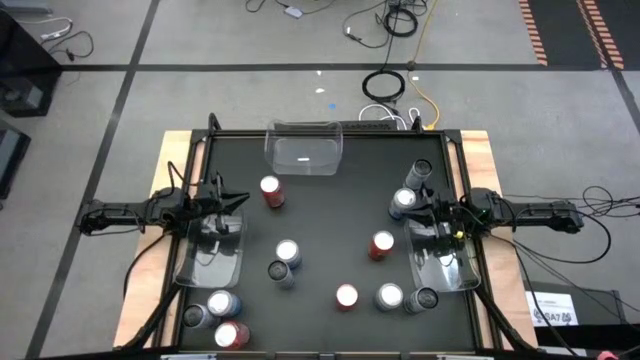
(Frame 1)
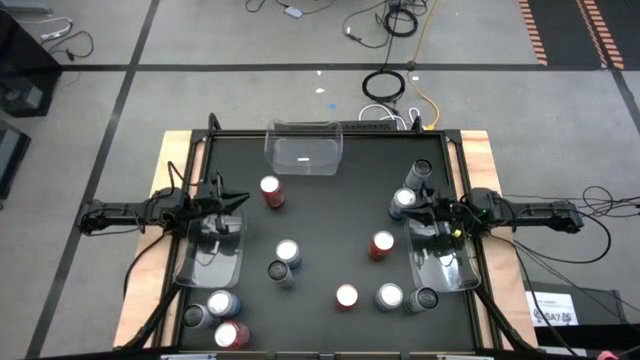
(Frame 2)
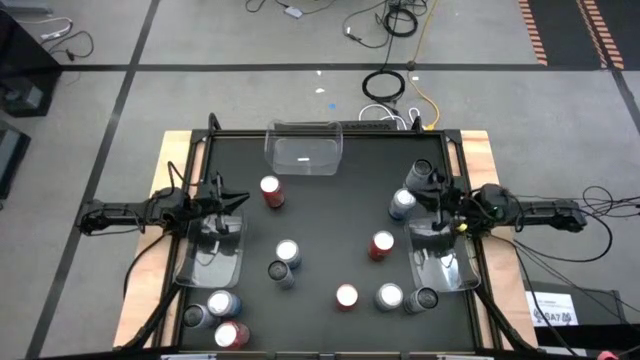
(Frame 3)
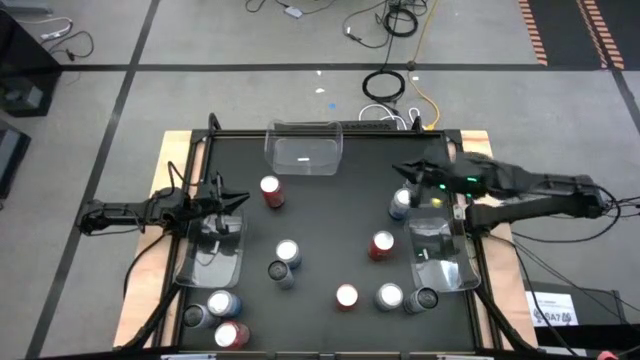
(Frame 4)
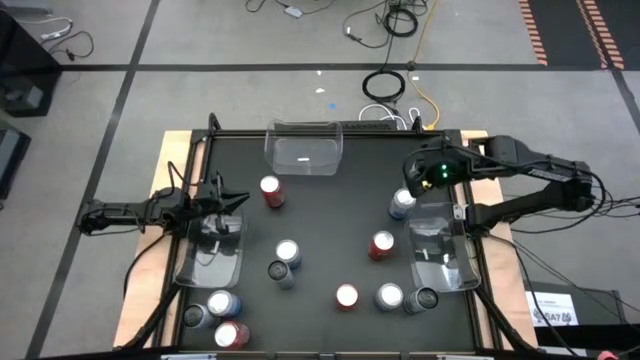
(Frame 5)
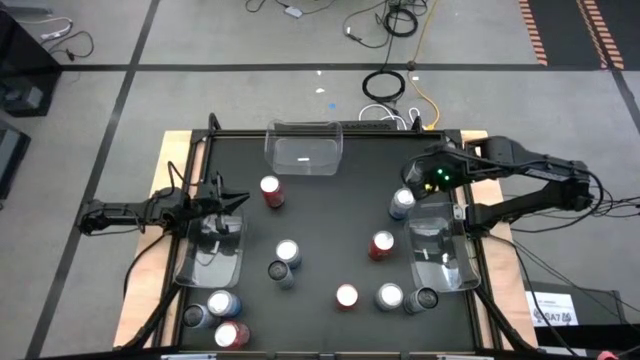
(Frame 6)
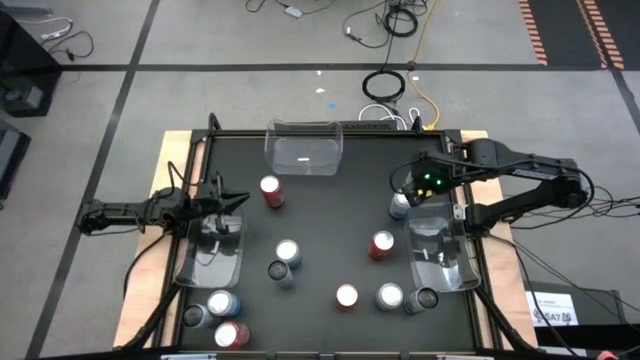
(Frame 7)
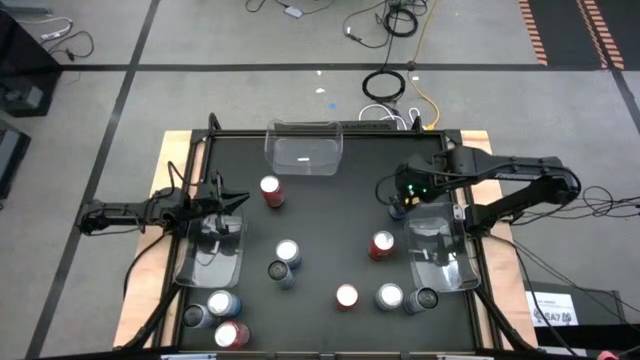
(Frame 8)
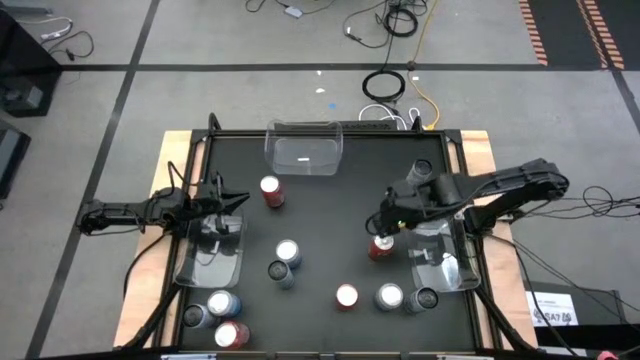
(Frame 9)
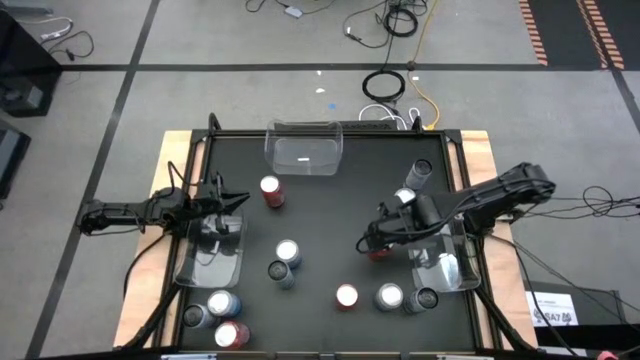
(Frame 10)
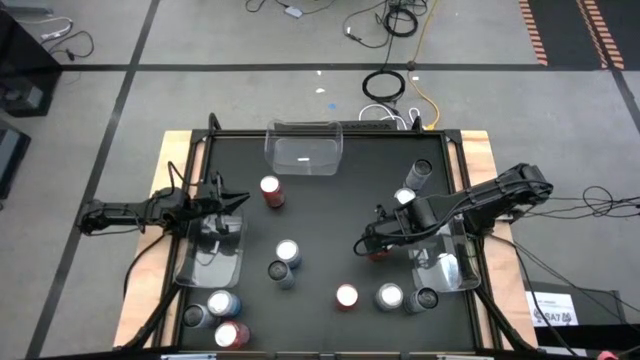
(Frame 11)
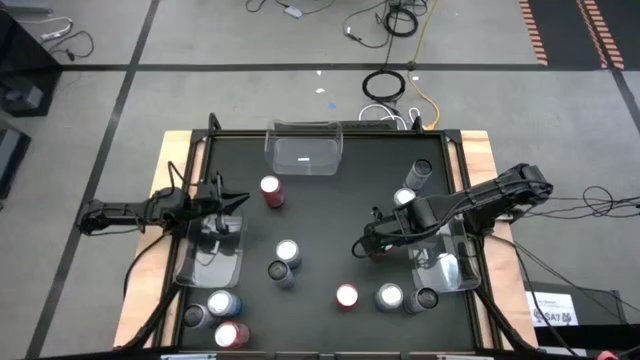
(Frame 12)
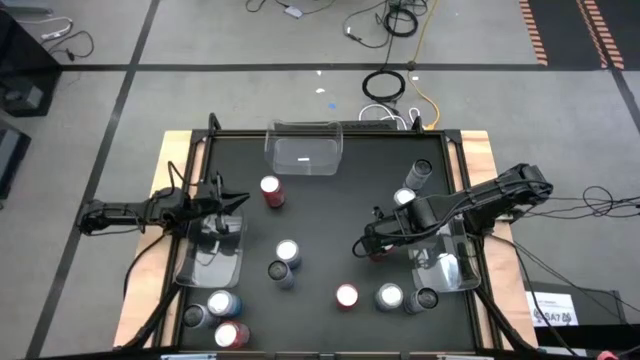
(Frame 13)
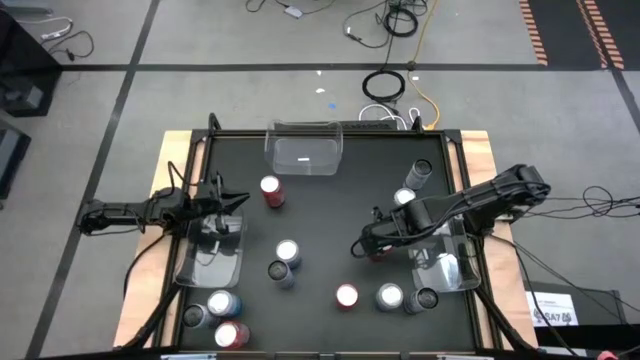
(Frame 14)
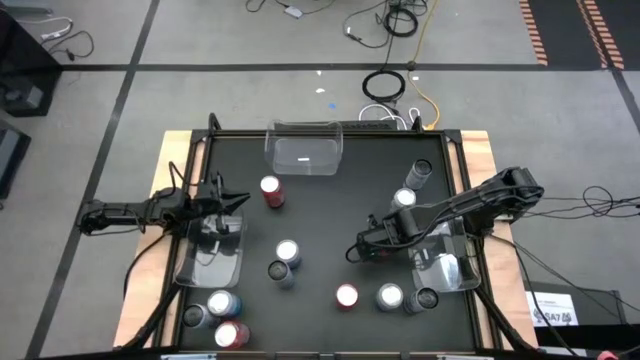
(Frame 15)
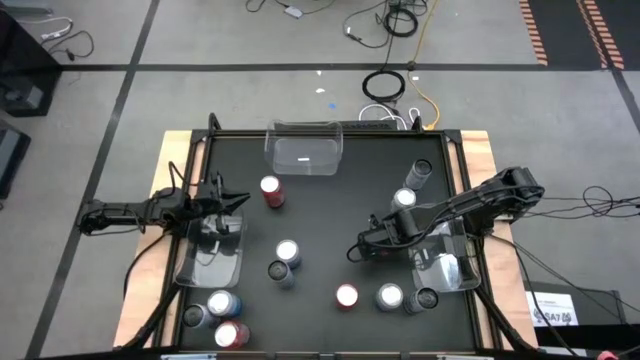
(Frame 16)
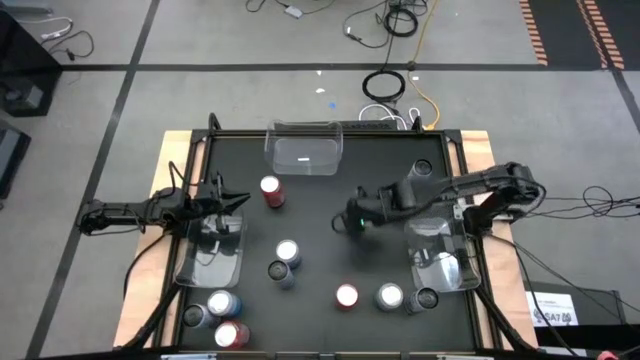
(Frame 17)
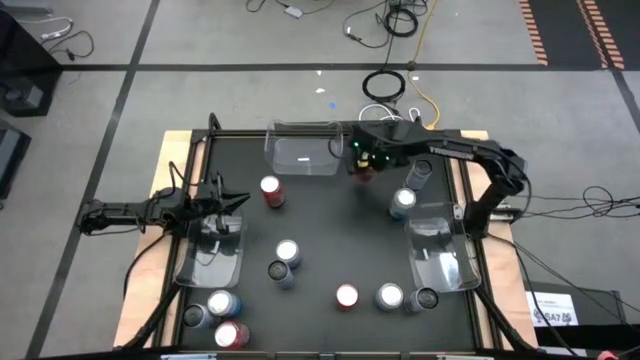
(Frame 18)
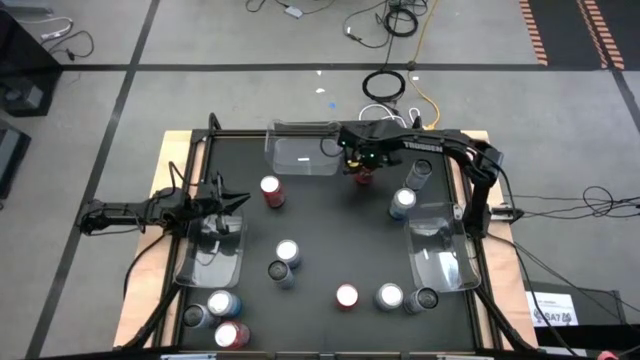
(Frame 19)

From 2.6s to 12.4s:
Task: Sort soda cans
Move the red soda can to the top center of the table

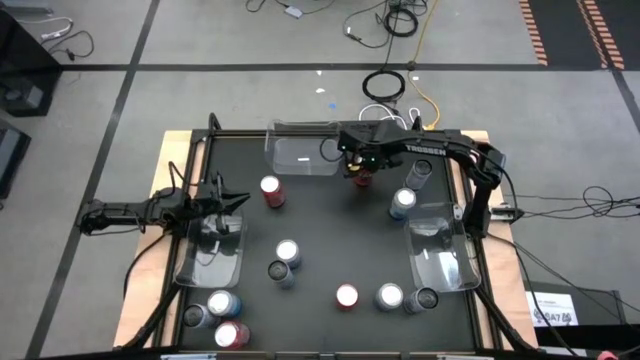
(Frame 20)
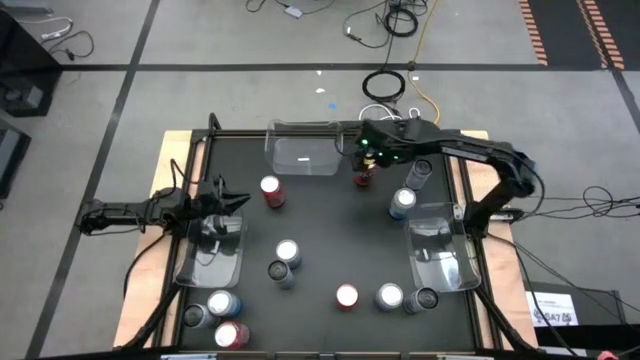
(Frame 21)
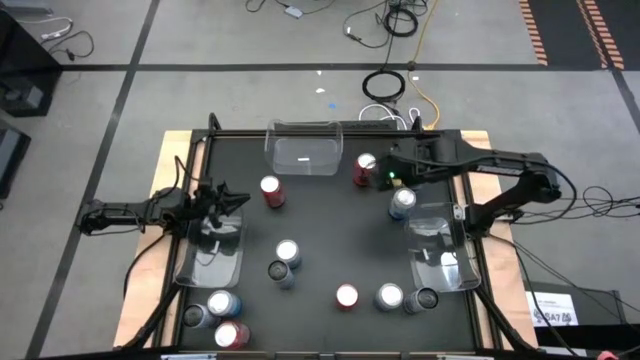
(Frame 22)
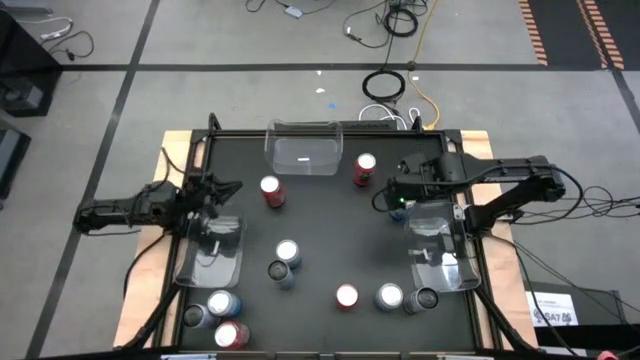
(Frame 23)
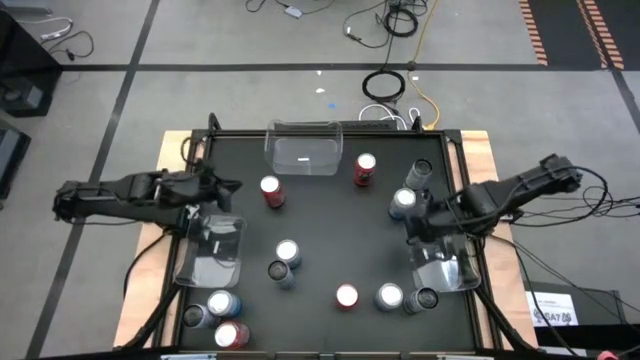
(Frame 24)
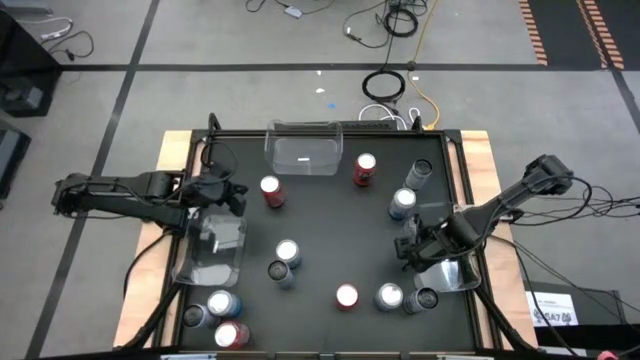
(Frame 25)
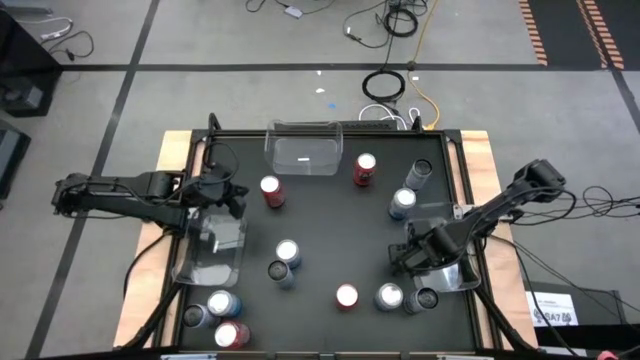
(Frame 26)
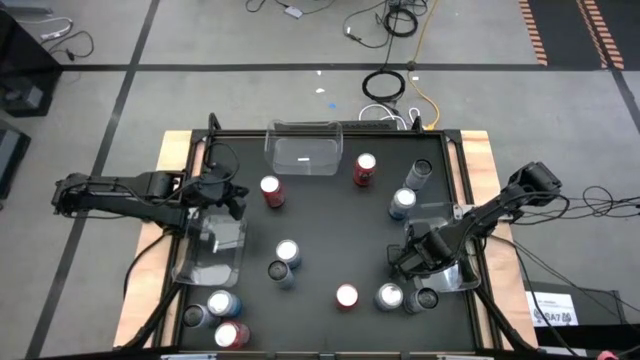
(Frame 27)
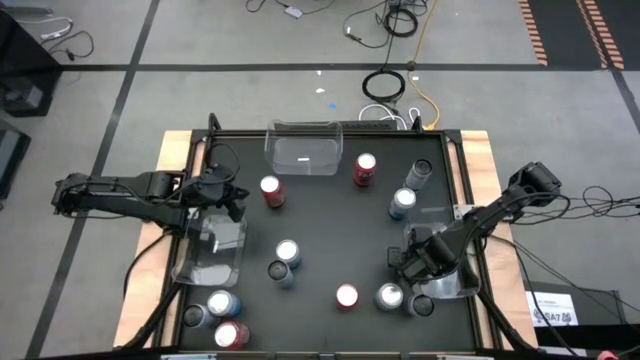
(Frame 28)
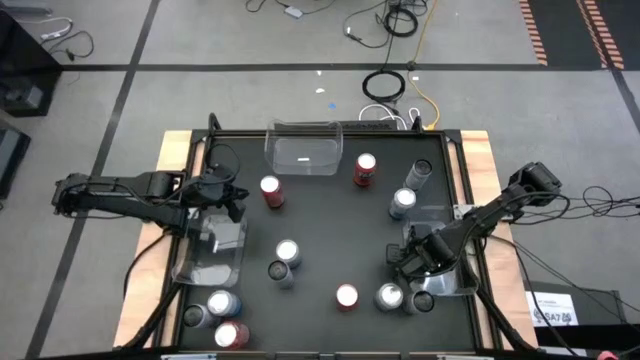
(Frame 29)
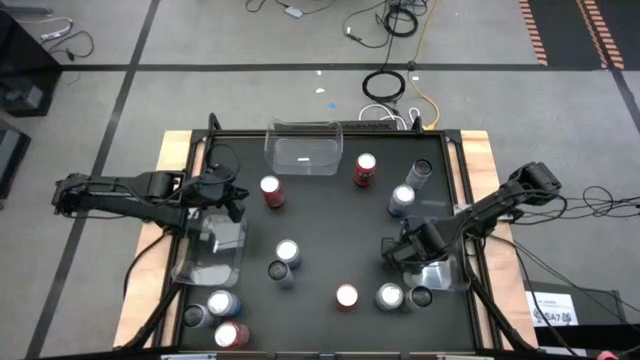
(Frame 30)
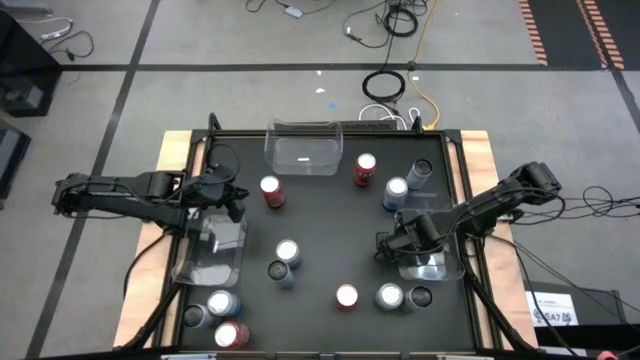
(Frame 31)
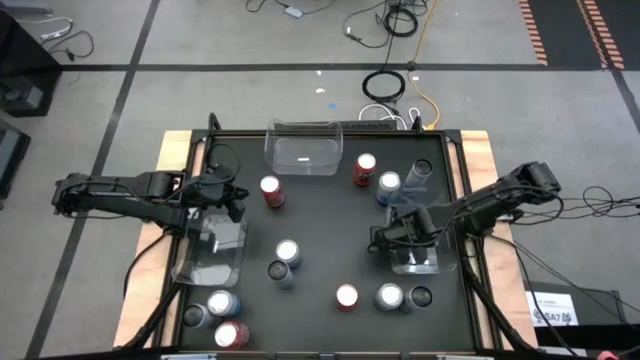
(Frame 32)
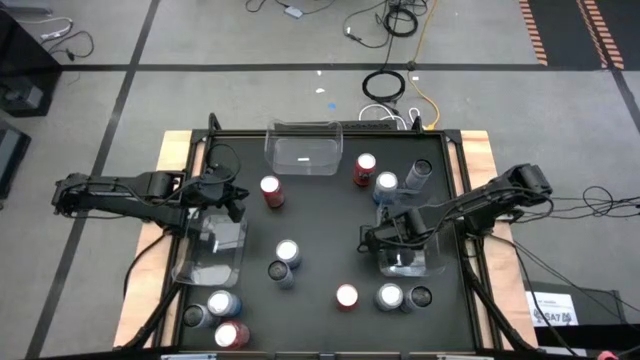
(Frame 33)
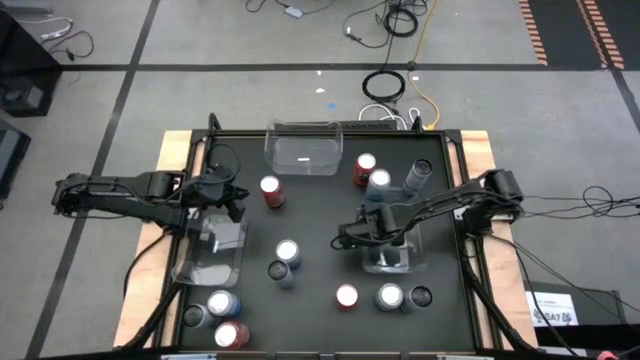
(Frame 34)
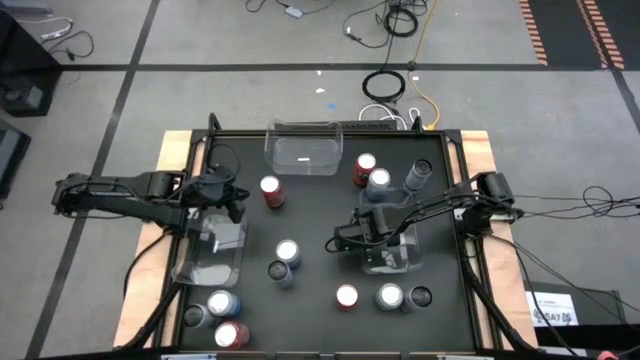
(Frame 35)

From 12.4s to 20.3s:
Adjust the right transparent bin to the middle right of the table

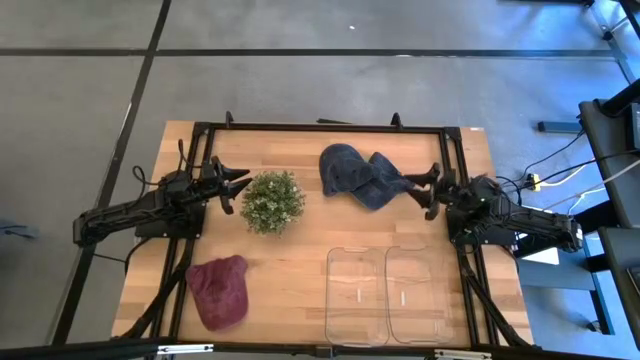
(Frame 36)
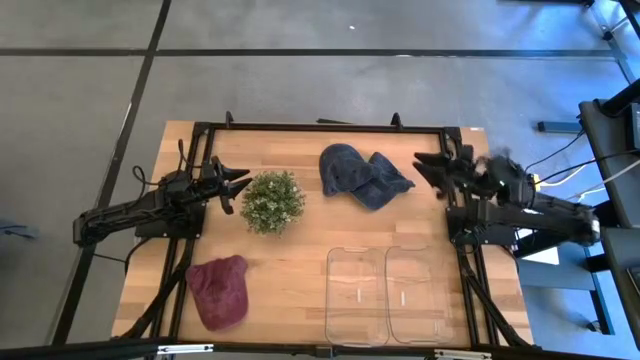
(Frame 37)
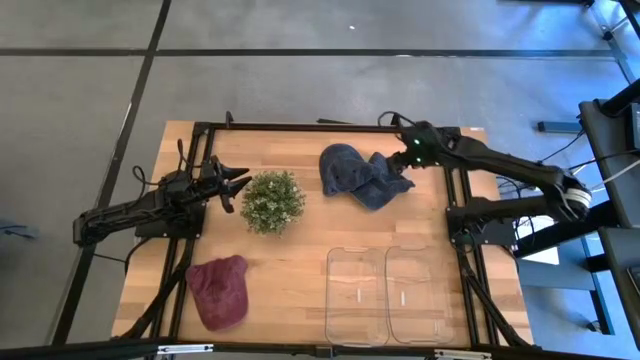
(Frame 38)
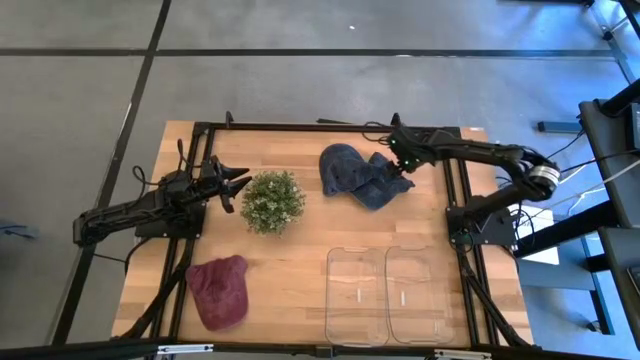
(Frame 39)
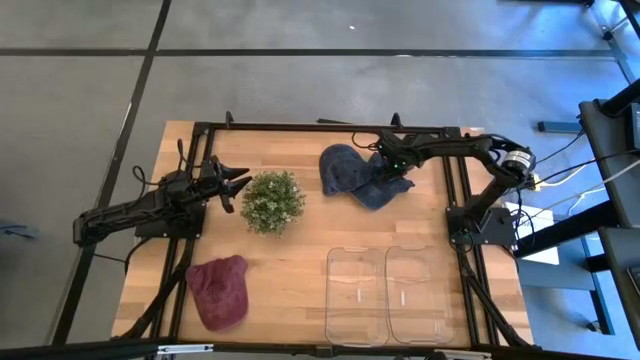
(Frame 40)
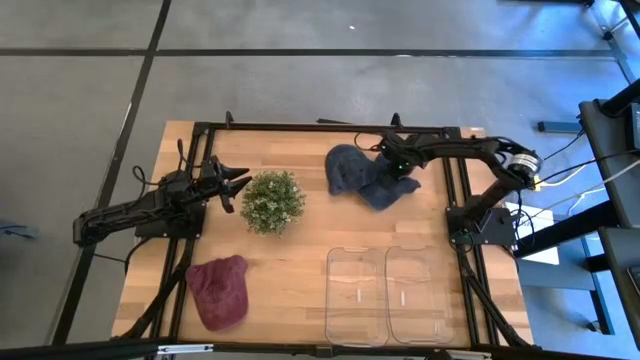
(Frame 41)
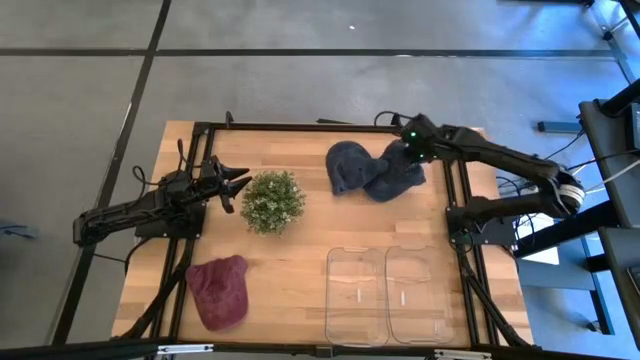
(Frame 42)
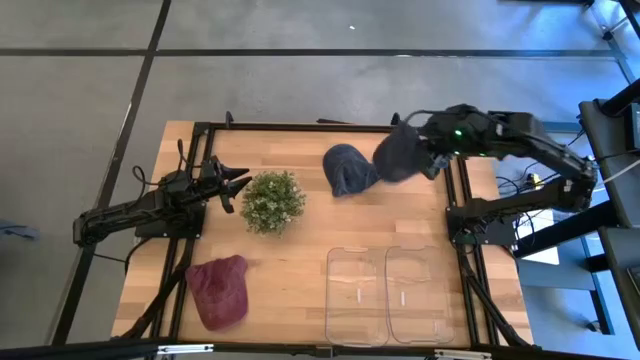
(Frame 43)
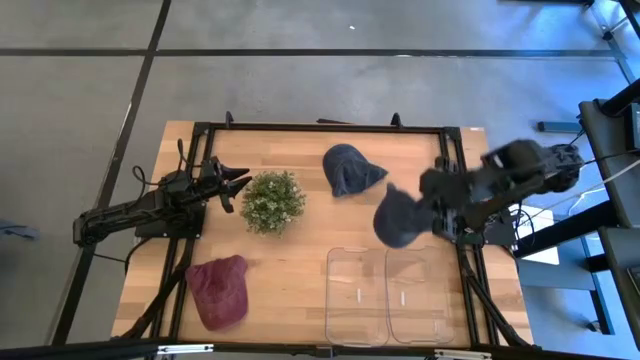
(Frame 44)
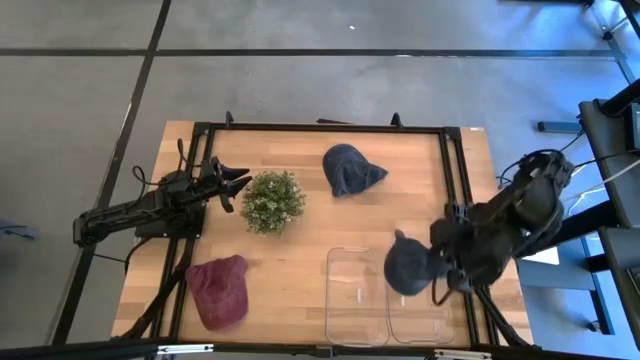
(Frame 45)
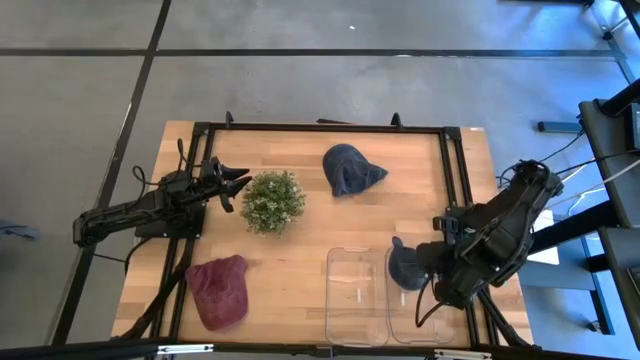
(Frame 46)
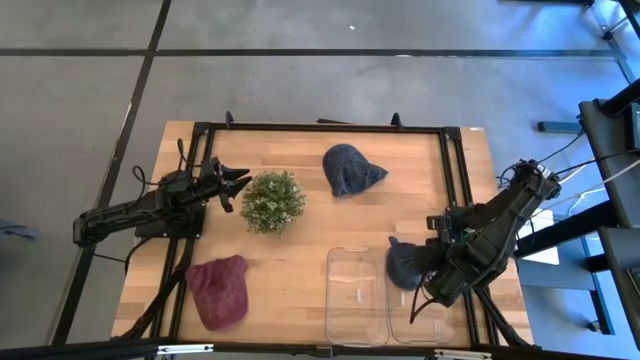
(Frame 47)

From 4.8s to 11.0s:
Task: Pick & Place hat
Put the right blue cap into the right transparent bin
